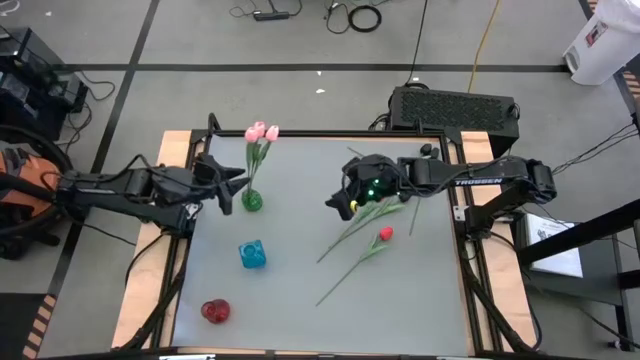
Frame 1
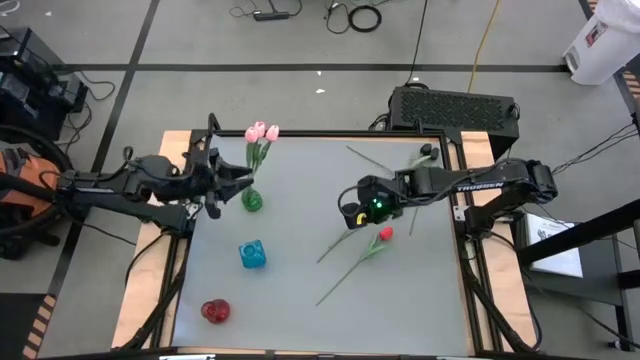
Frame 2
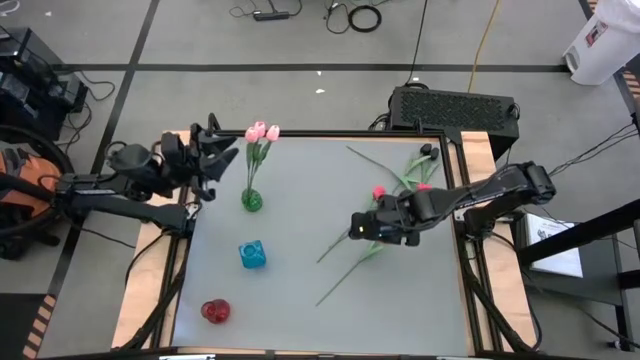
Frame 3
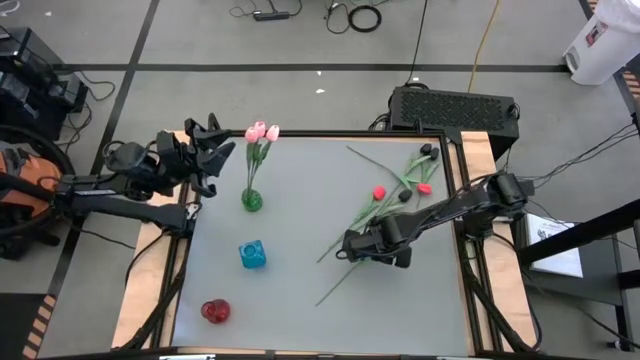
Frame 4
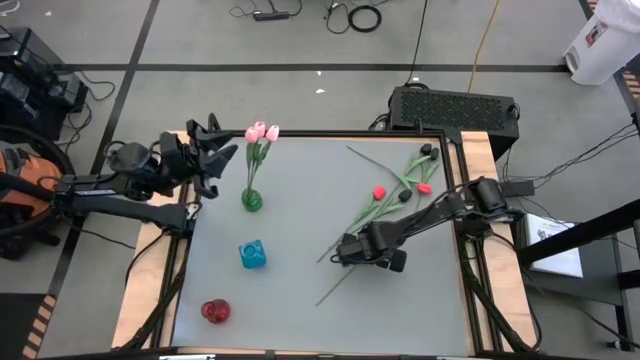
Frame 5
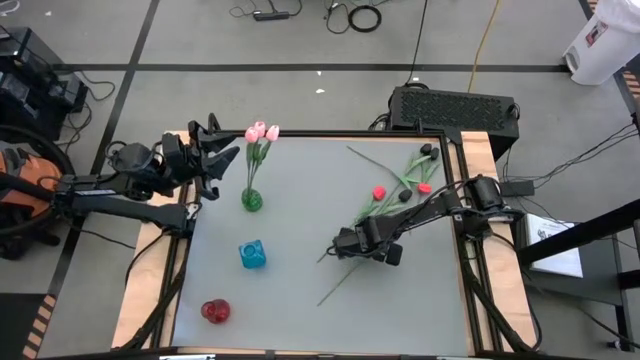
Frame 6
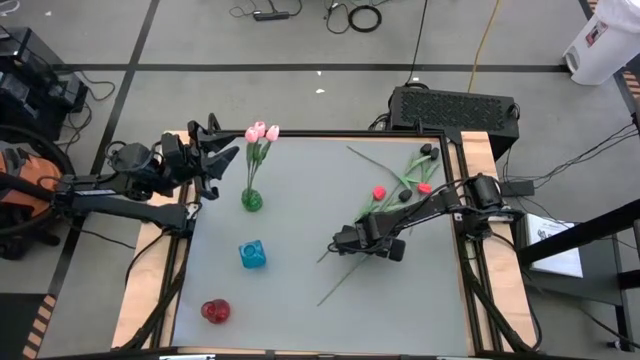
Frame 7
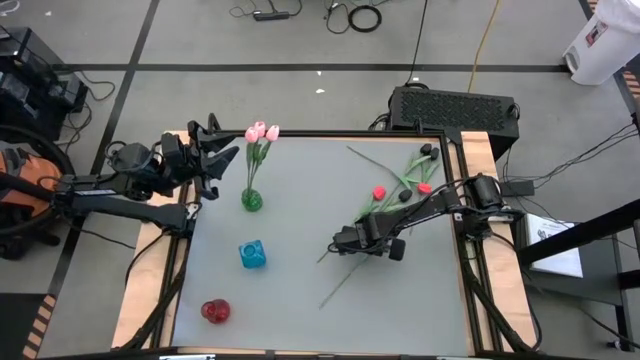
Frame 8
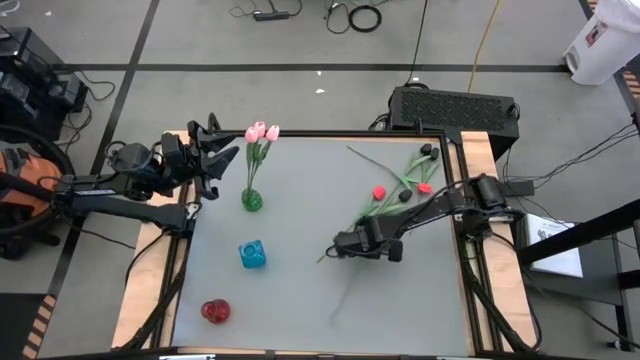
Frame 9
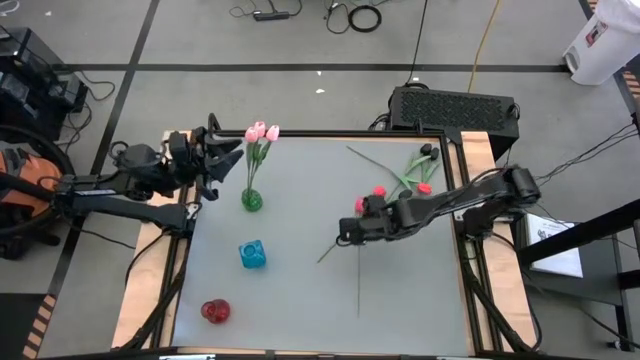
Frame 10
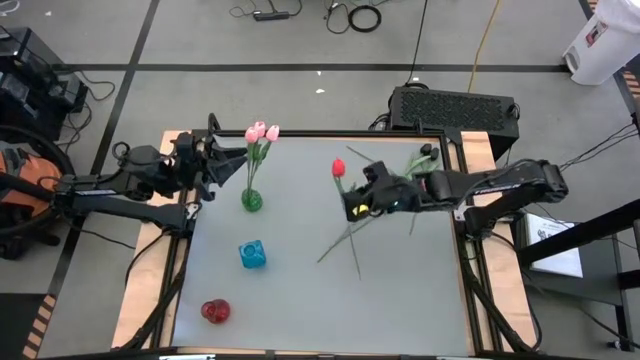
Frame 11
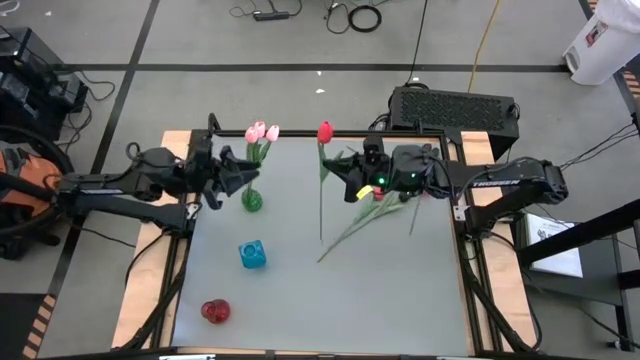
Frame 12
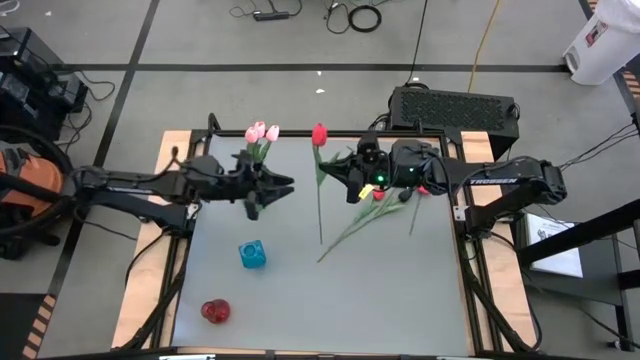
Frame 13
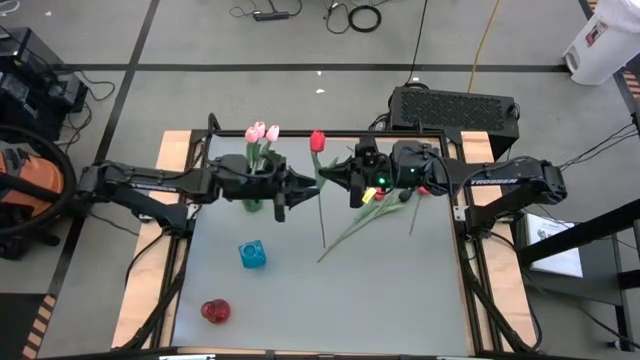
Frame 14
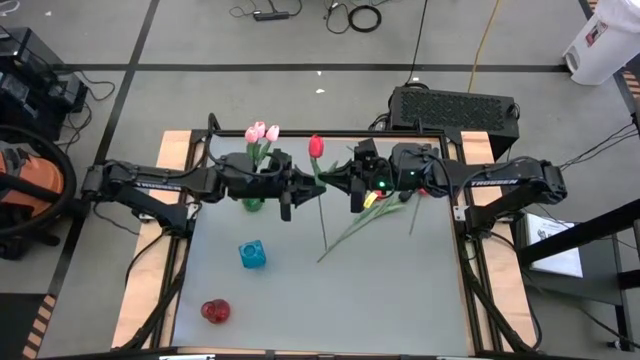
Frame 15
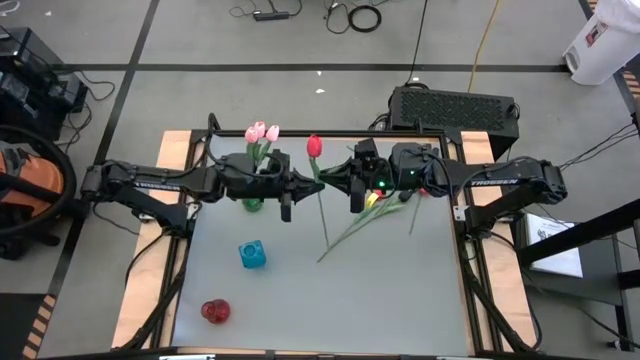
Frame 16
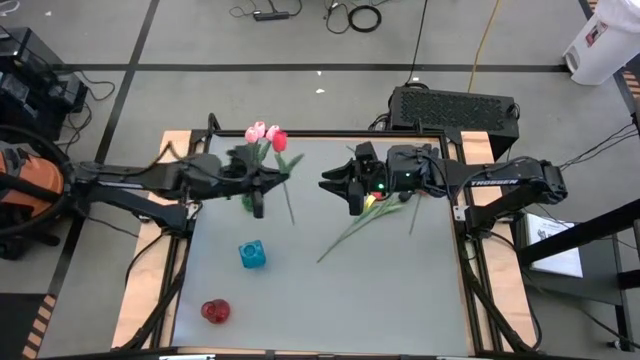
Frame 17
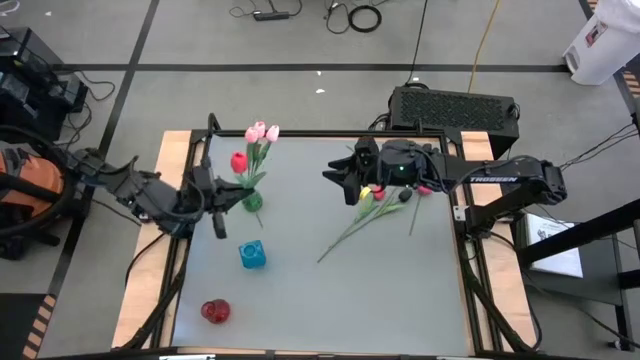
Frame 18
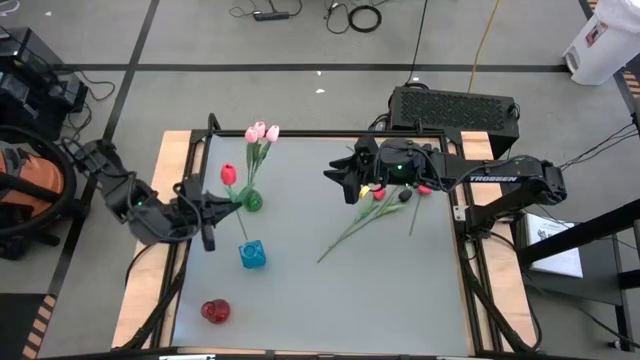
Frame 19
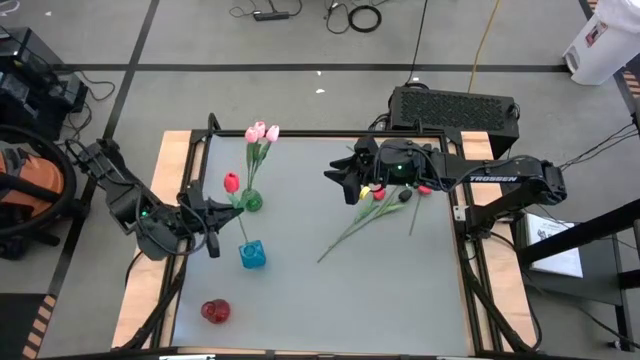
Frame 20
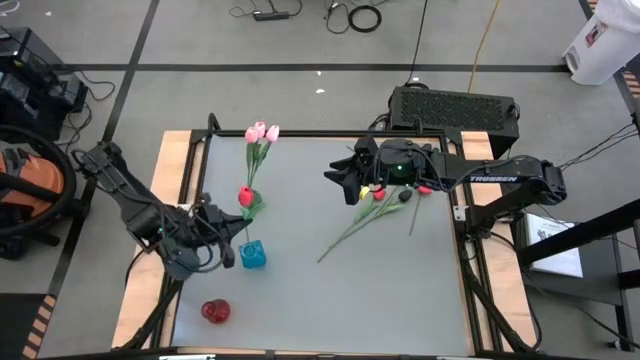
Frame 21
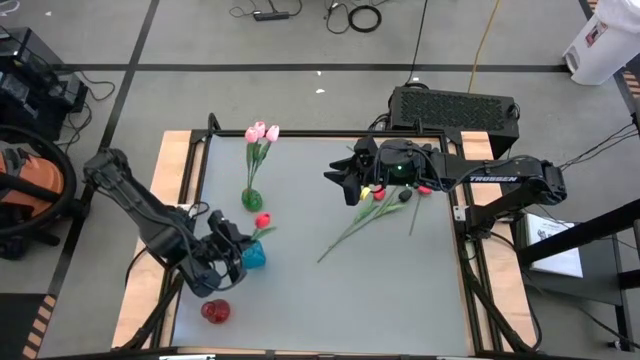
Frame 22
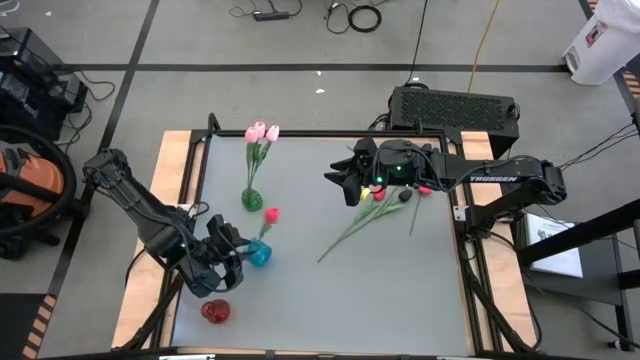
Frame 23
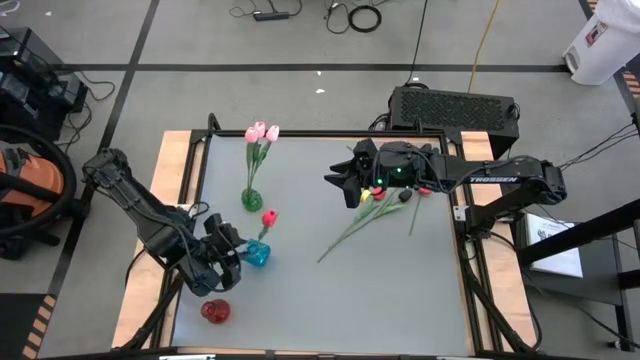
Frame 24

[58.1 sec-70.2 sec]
Task: Sort flowers into vase by color
Put the bottom red flower into the blue vase

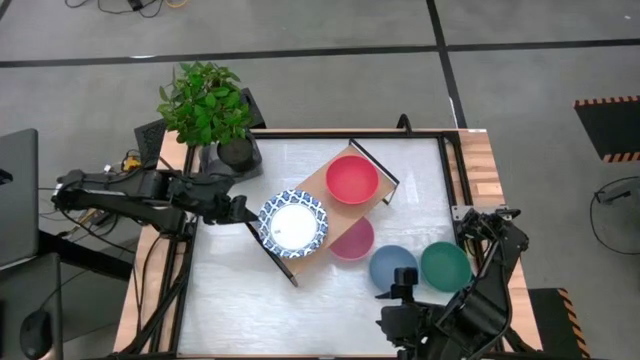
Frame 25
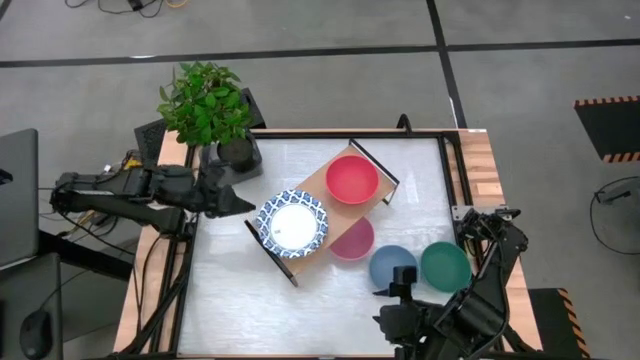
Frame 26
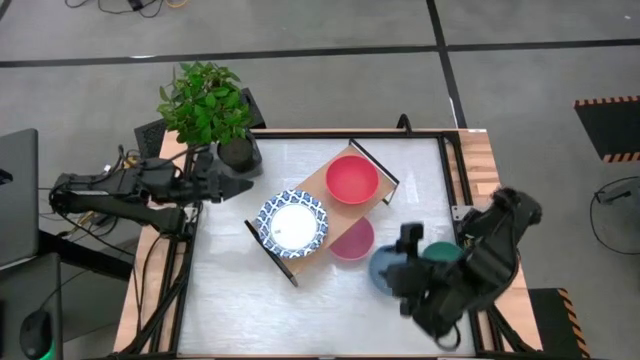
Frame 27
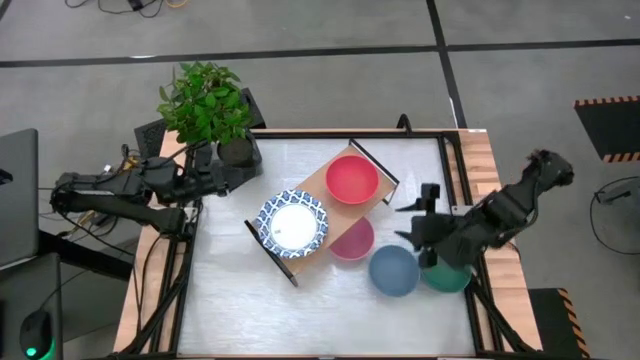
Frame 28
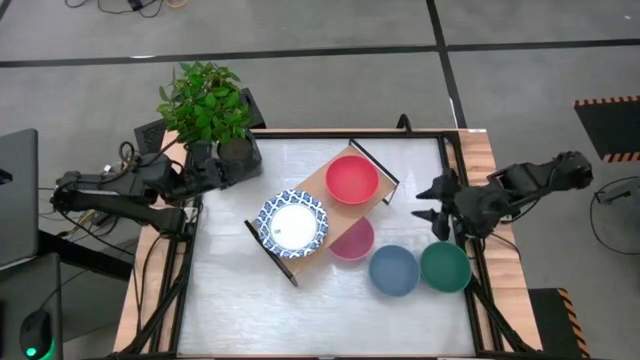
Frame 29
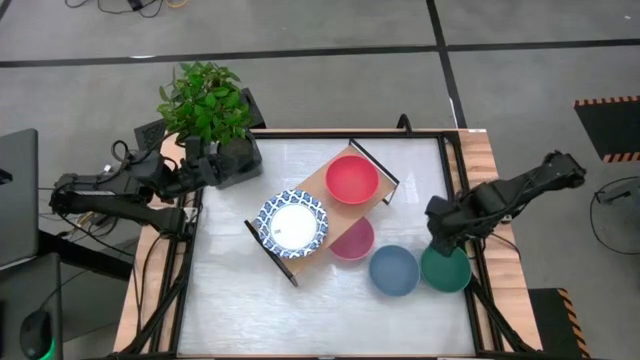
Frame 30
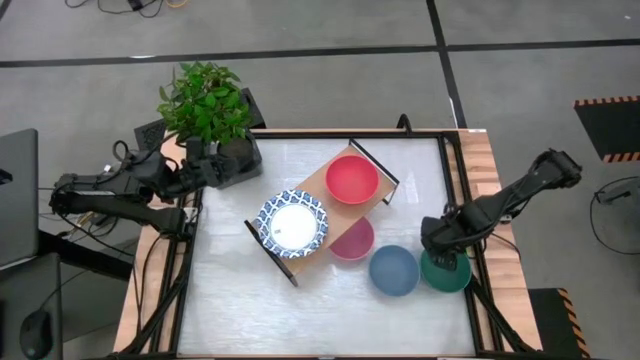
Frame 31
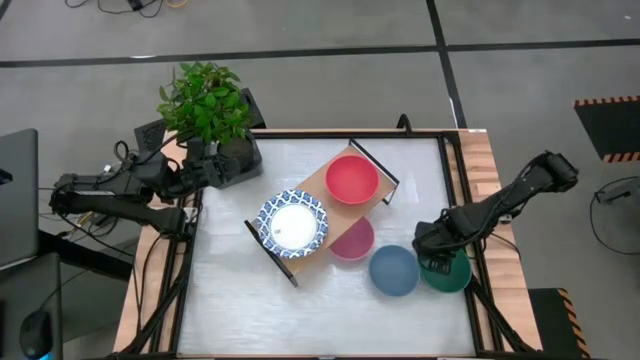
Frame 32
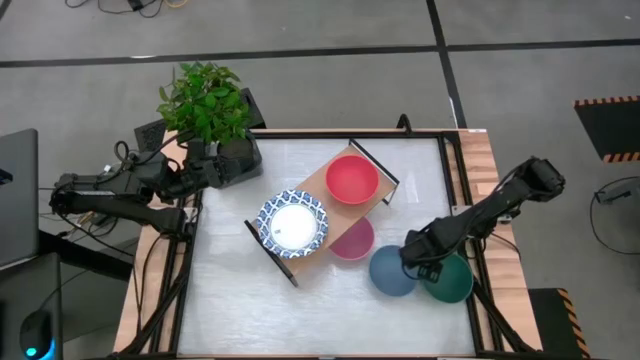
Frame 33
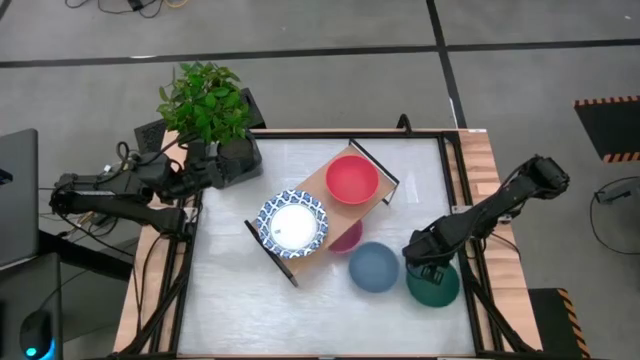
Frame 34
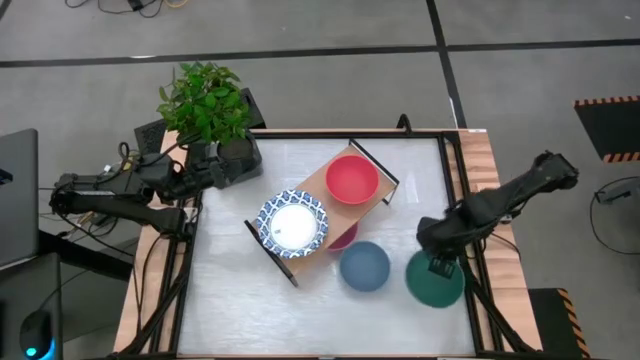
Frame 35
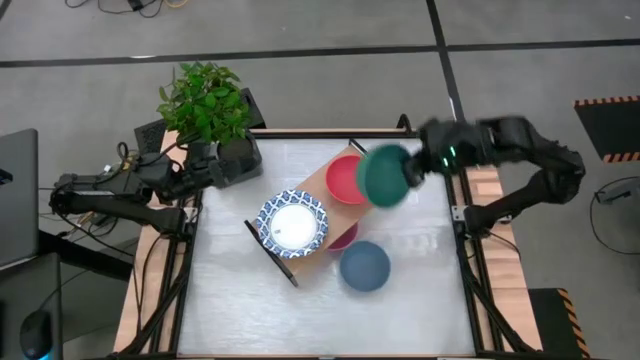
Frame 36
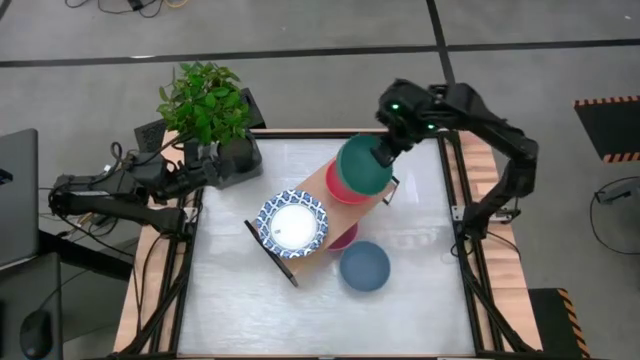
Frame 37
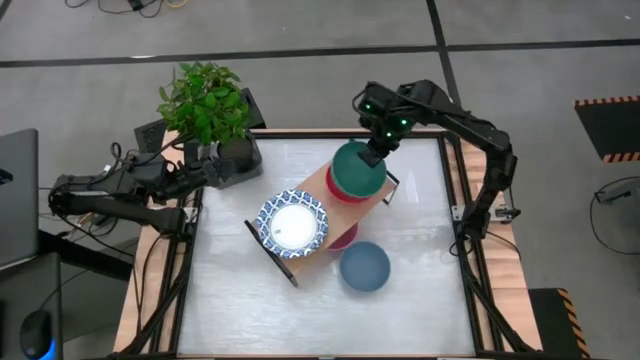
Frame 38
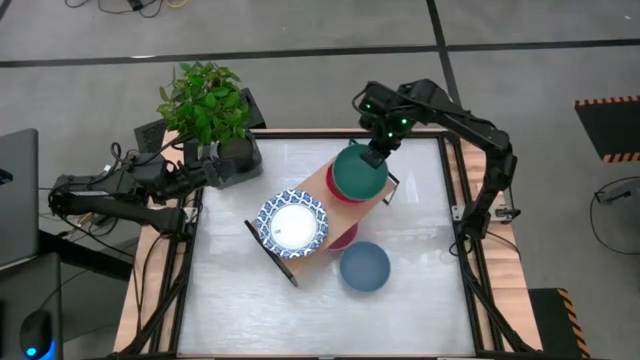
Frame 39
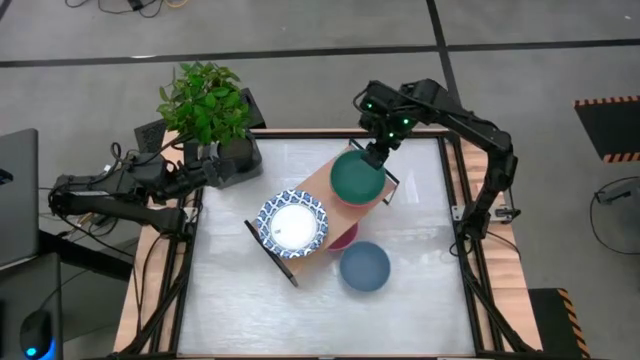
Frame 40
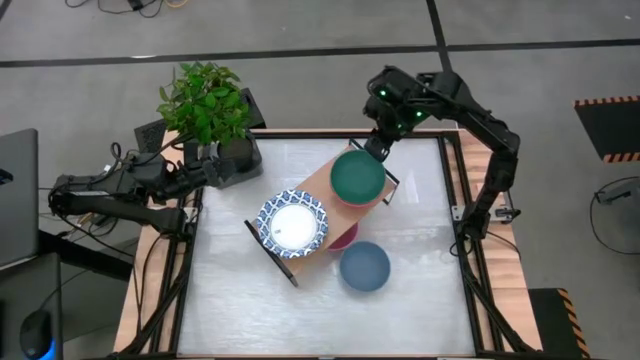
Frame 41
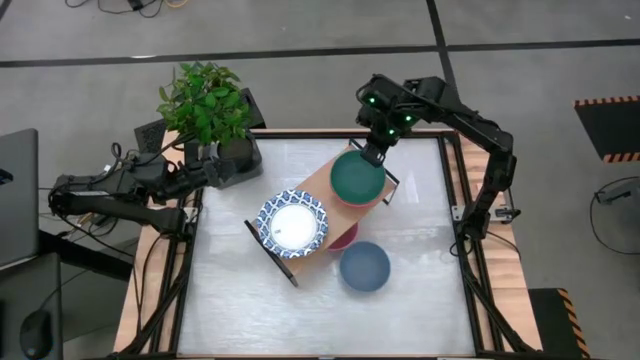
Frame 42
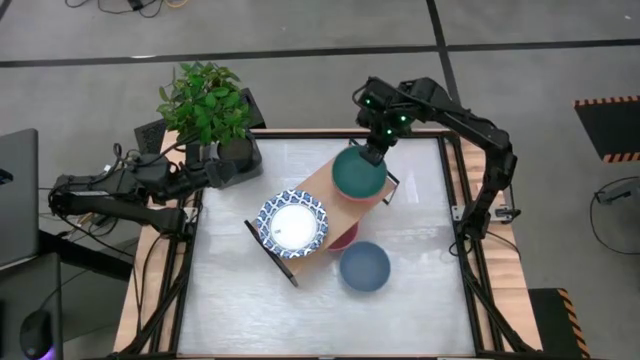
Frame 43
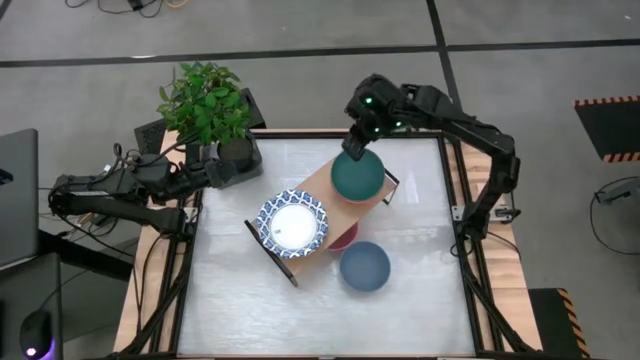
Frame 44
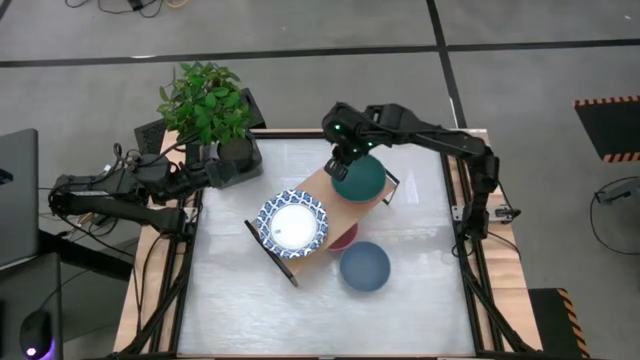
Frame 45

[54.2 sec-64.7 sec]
Task: Place and stack bowls onto a shelf
Stack the green bowl on top of the red bowl on the shelf
